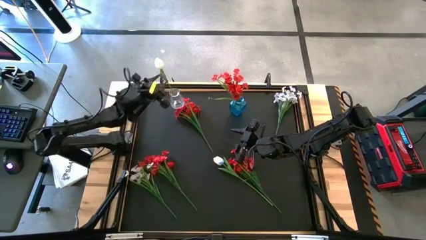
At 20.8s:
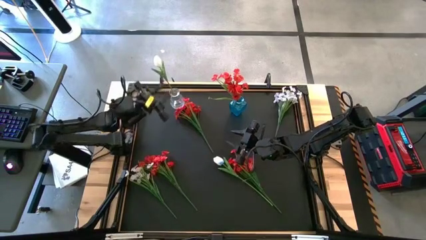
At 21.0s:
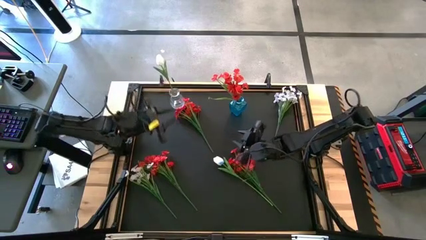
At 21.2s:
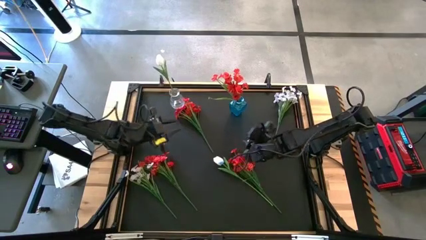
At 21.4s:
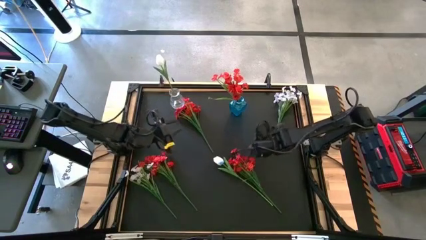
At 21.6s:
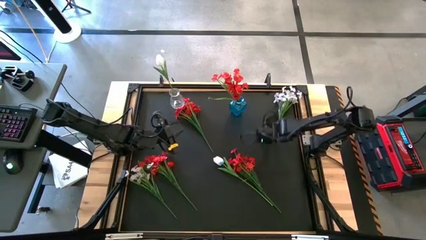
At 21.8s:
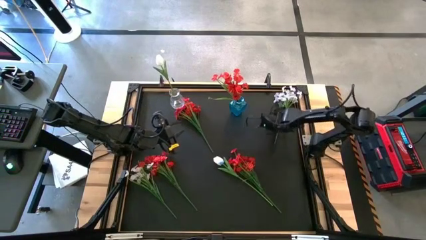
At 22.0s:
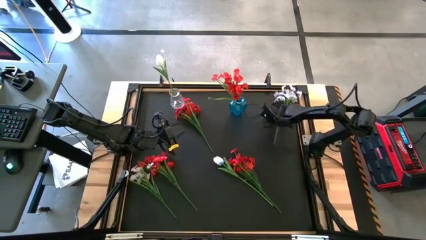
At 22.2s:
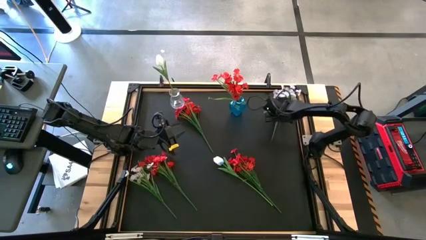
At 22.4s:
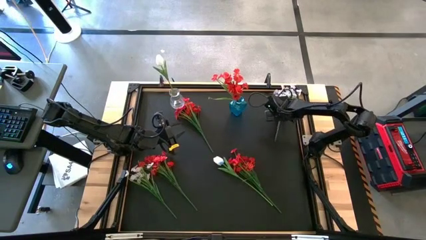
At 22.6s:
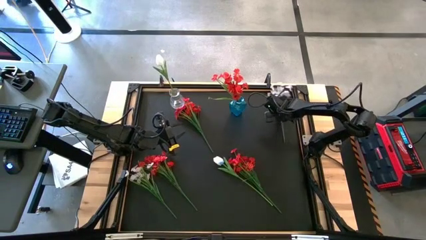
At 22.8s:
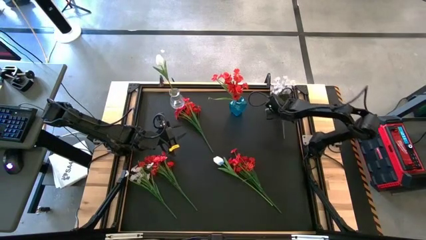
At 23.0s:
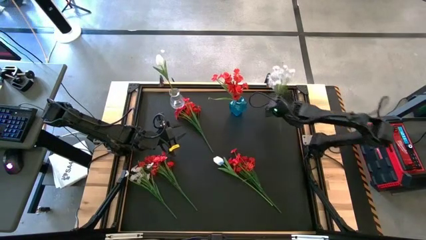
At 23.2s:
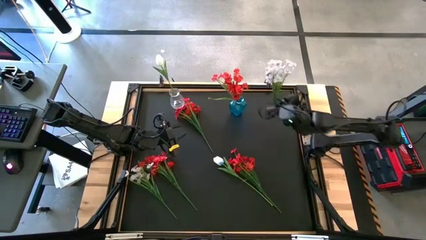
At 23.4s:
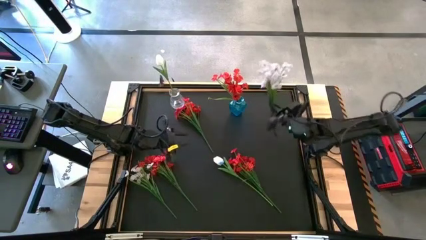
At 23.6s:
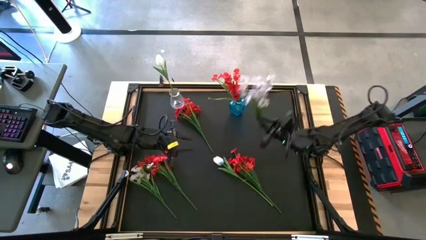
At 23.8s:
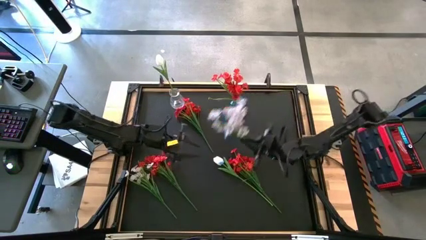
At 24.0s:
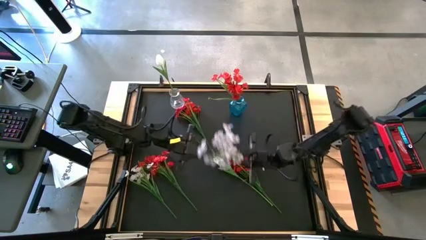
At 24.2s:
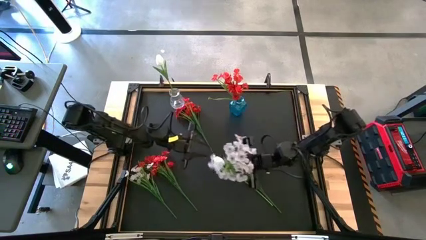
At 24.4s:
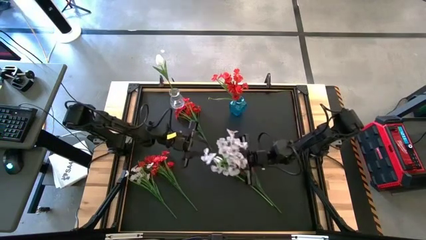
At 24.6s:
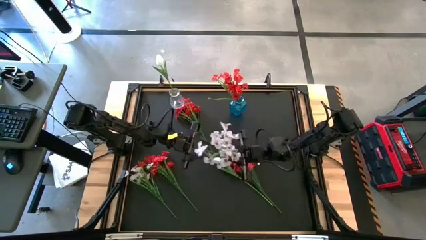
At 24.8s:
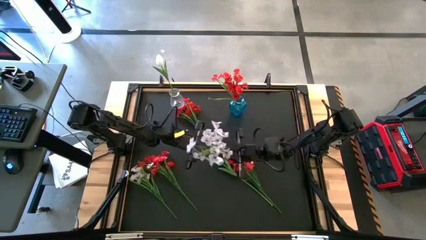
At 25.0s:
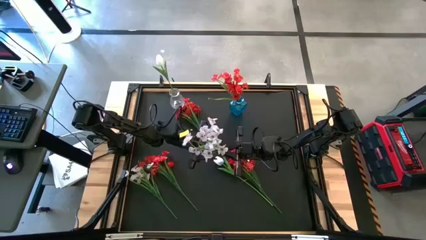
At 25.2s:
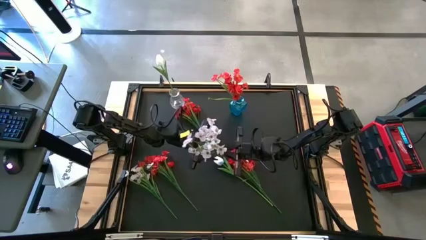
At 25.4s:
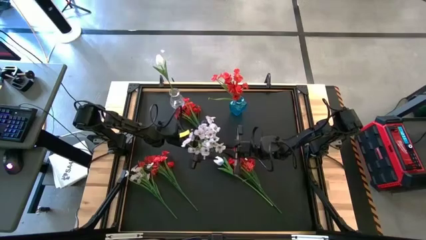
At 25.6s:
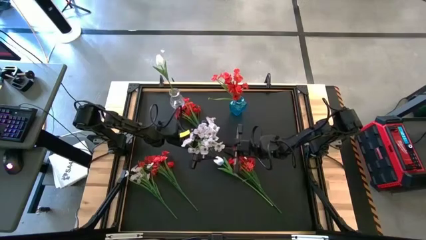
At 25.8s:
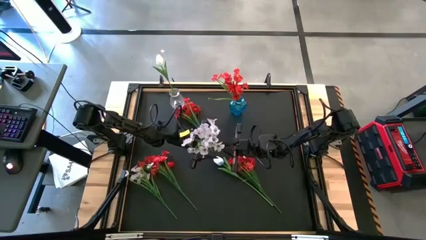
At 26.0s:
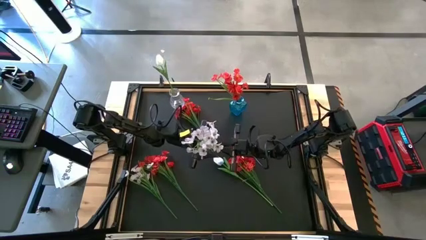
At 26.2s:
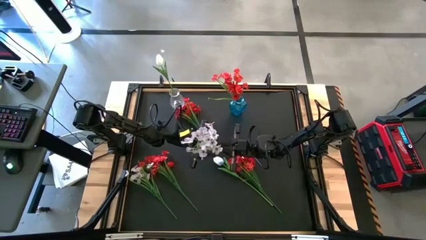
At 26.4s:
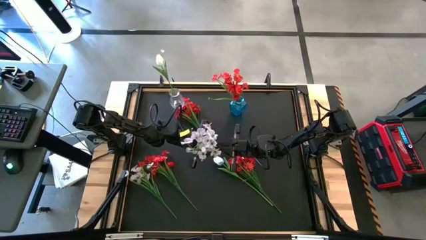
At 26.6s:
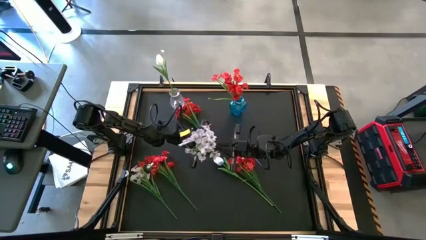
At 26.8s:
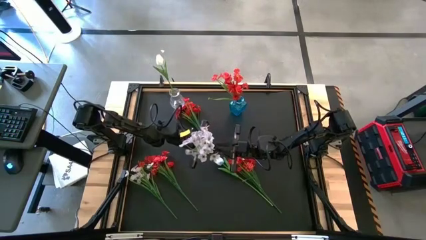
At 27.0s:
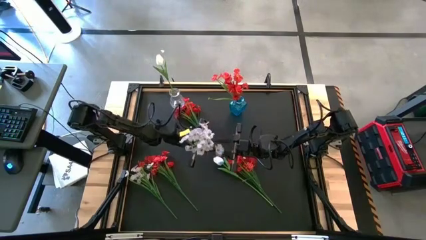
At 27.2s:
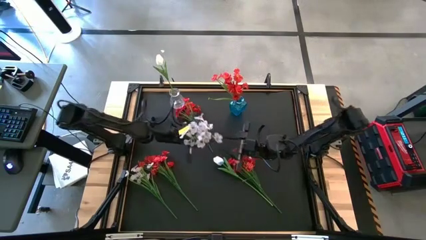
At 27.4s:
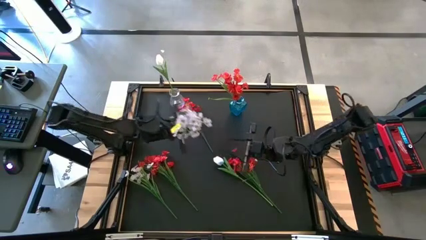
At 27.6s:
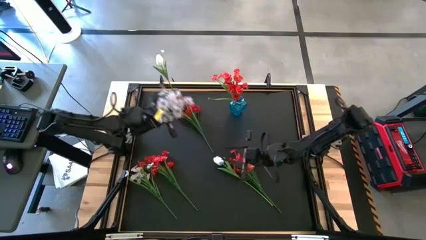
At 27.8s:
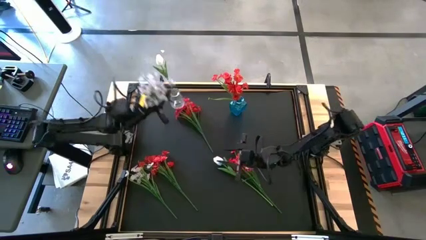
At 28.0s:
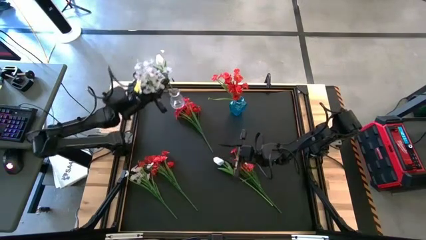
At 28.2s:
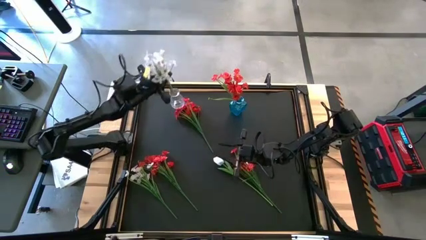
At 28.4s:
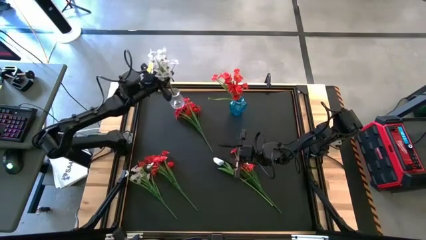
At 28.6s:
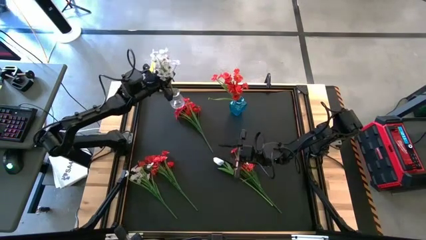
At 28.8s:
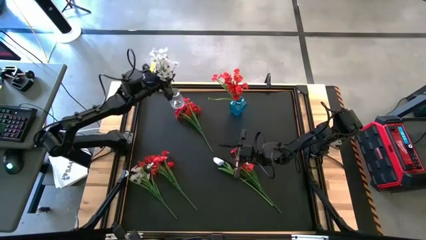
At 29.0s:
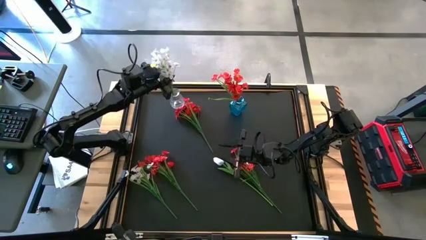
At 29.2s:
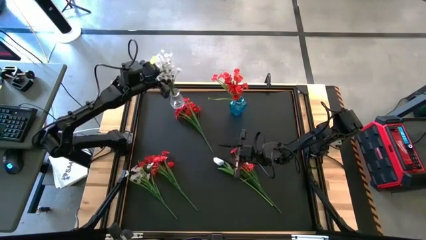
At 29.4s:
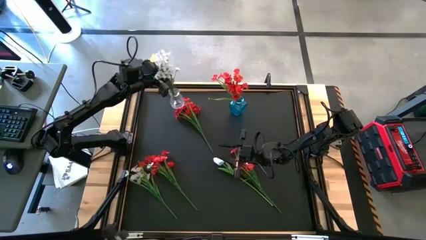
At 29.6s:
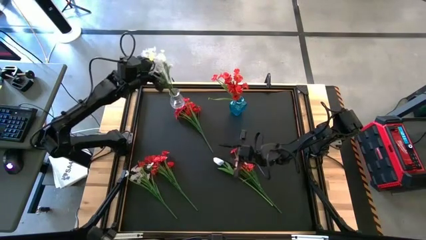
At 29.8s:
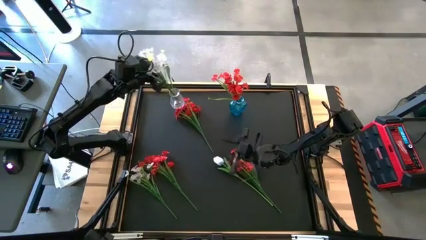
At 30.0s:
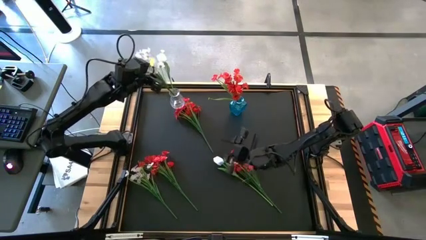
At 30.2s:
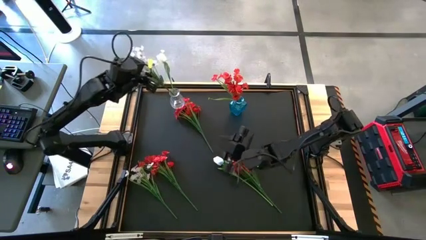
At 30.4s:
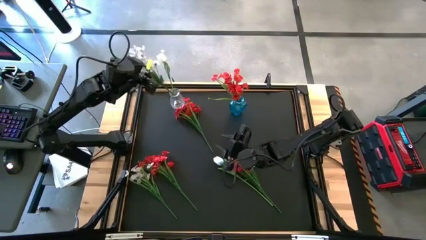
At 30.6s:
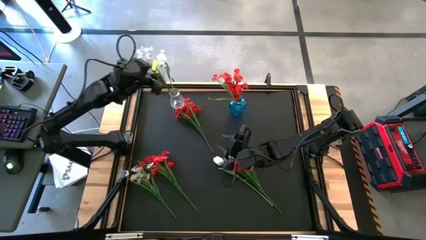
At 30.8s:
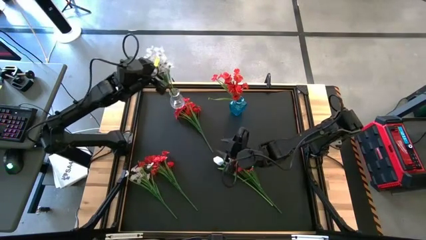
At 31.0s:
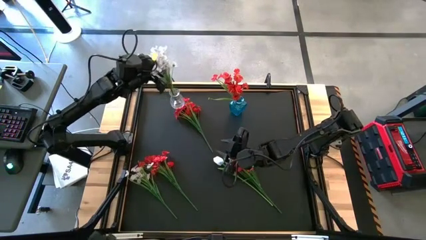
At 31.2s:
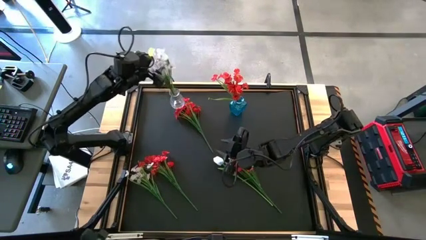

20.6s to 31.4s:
Task: Sort flowers into vase by color
Put the top white flowers into the transparent vase

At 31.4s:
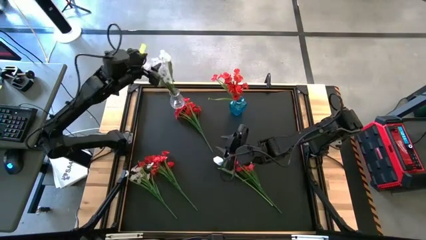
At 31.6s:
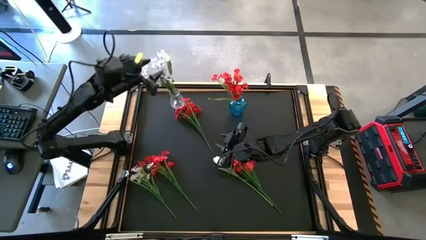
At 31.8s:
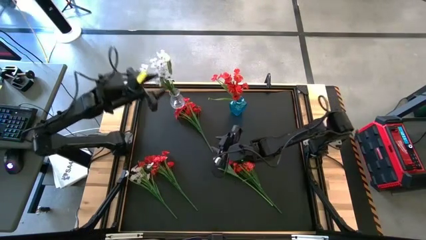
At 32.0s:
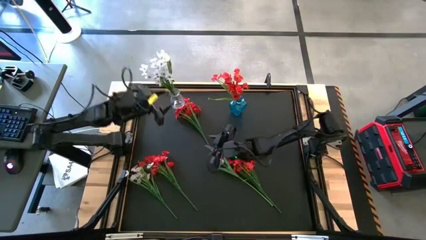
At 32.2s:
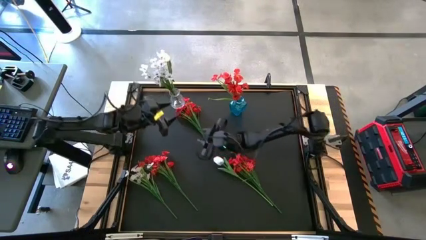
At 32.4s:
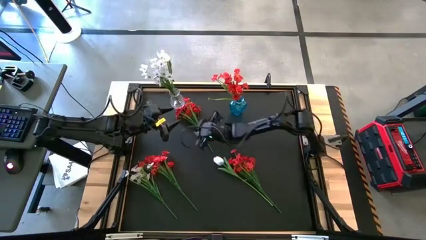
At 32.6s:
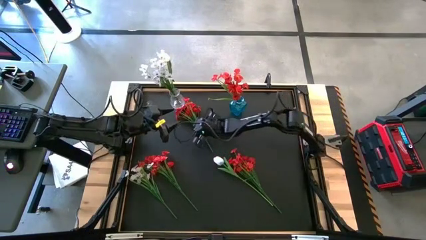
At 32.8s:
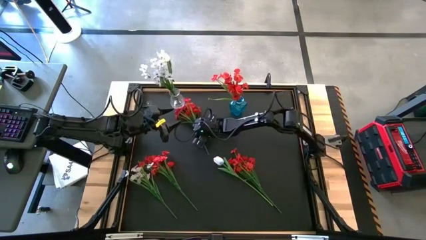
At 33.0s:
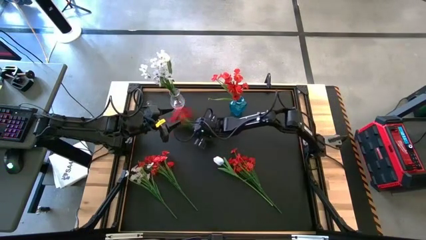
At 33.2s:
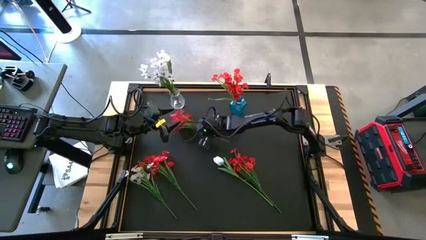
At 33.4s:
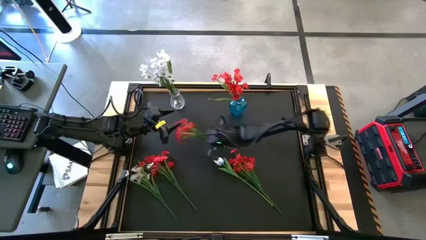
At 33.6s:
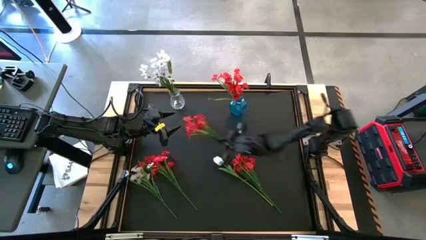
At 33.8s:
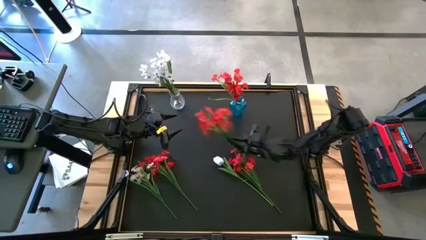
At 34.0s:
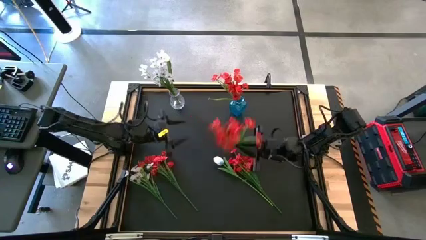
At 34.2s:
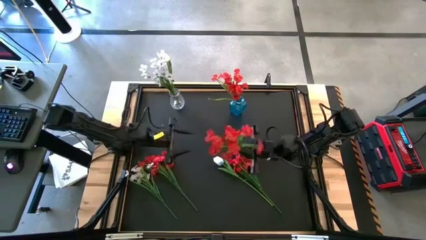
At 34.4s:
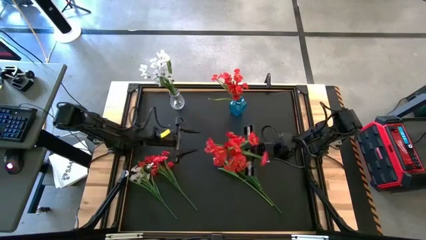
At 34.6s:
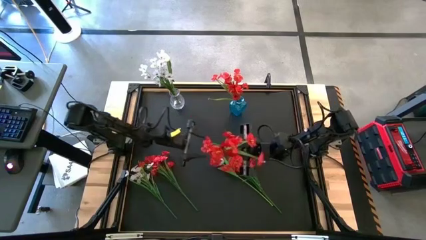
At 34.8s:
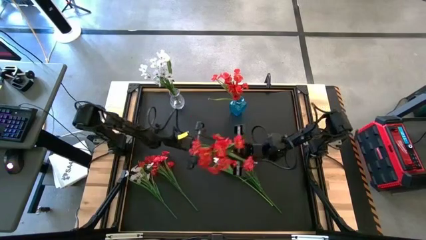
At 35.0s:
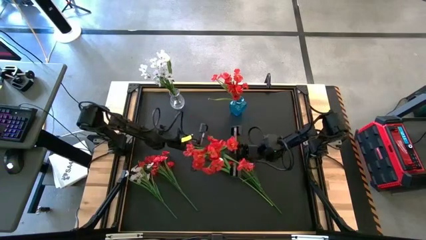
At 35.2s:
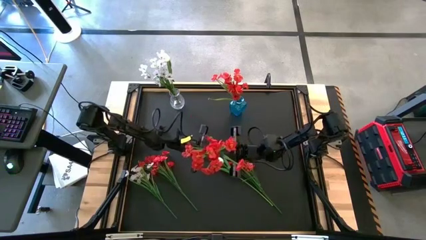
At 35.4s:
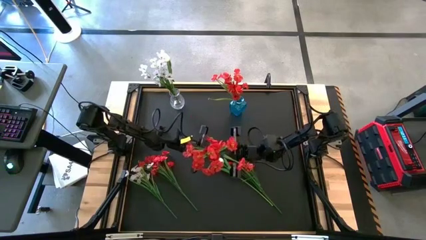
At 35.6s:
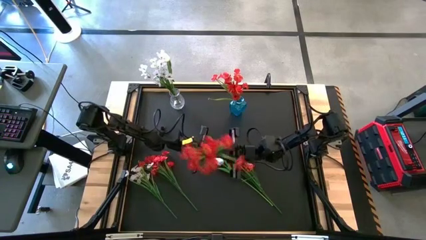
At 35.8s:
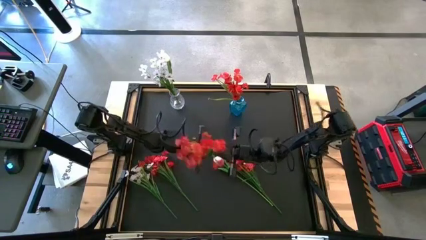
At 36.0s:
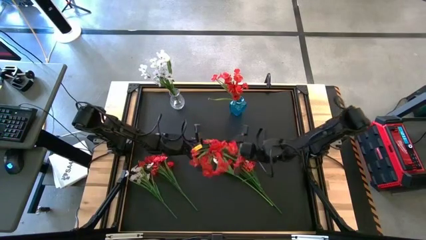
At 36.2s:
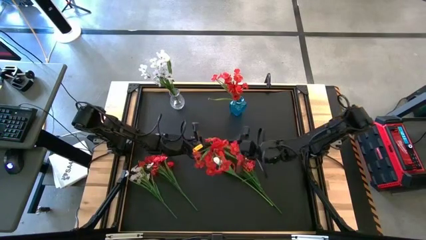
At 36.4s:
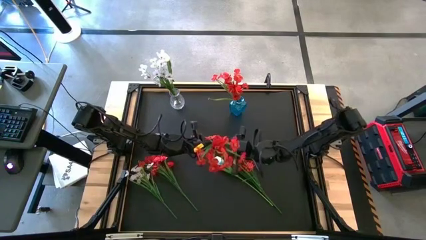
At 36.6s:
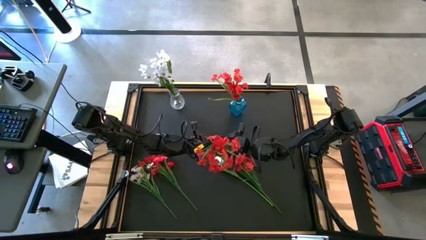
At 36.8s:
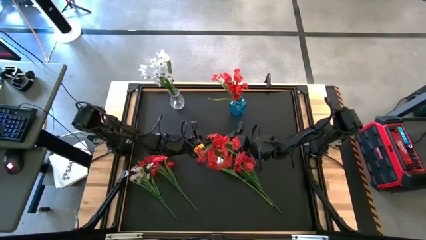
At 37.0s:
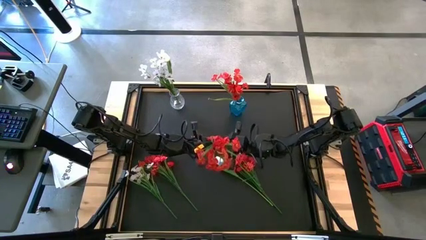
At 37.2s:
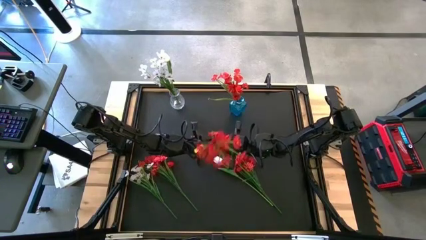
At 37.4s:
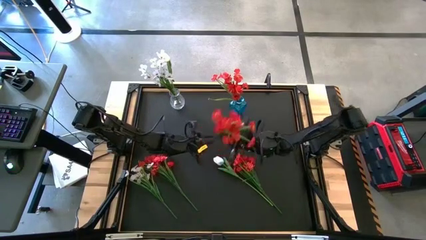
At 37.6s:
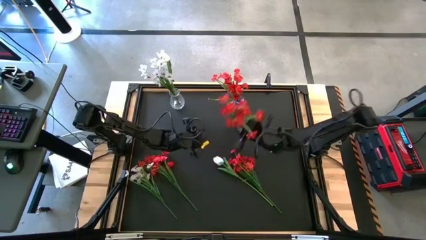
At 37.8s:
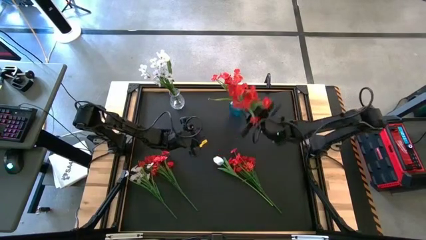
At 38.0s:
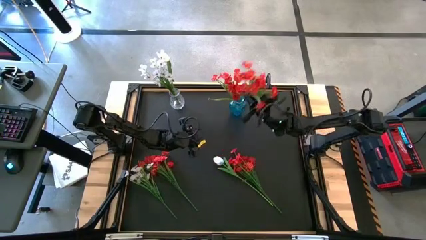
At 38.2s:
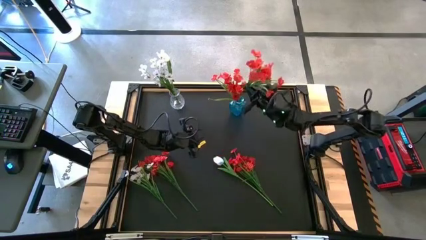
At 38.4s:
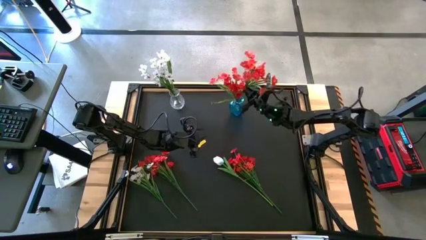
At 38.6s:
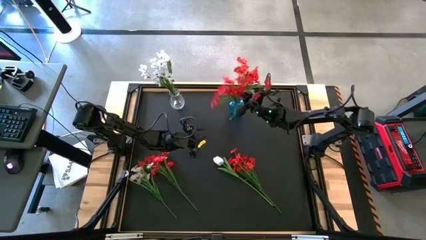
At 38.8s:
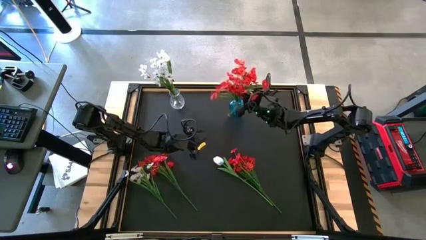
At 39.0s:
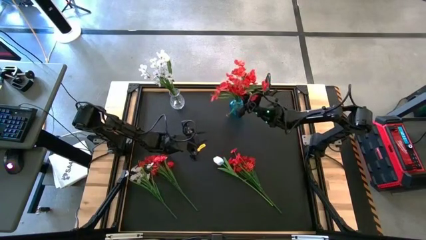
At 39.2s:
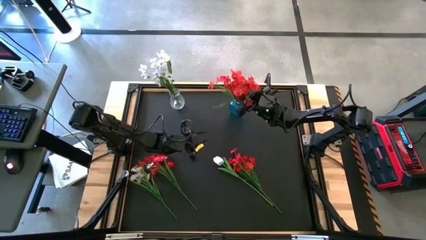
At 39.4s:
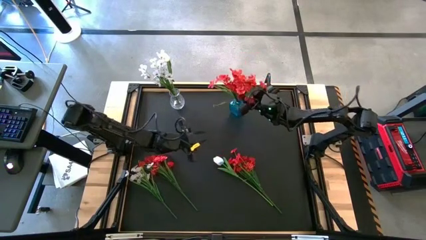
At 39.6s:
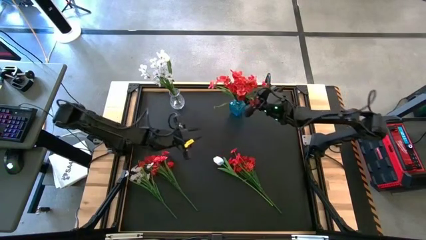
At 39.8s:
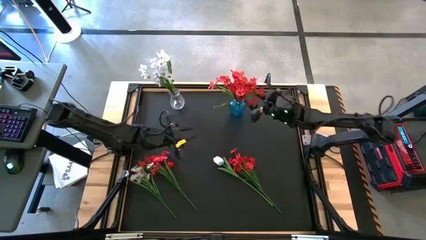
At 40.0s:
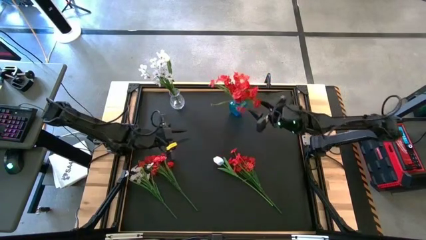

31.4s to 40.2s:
Put the top red flowers into the blue vase
